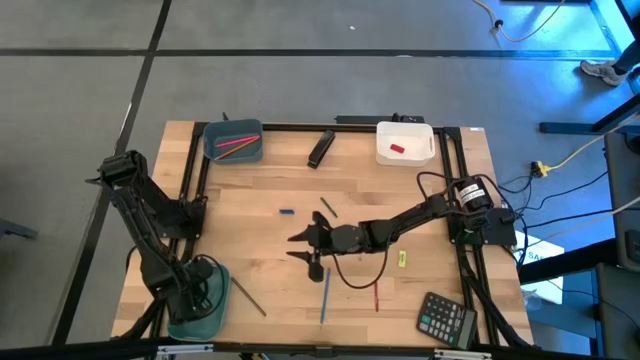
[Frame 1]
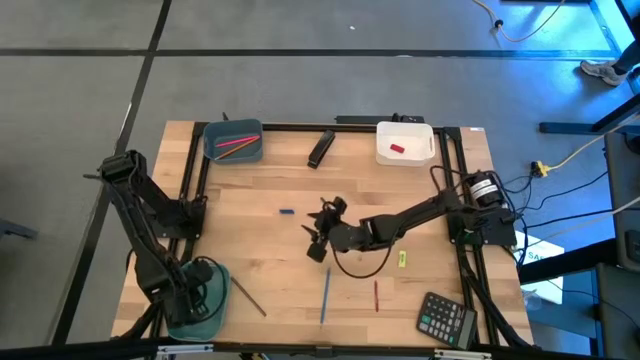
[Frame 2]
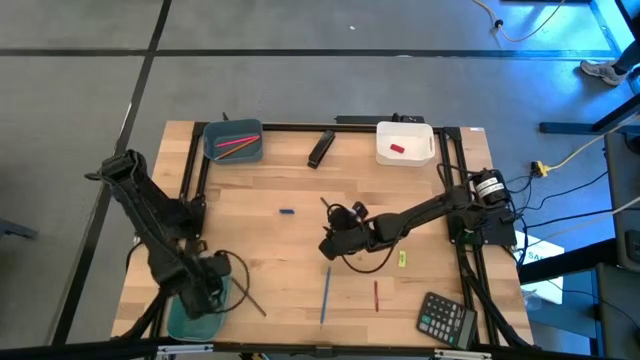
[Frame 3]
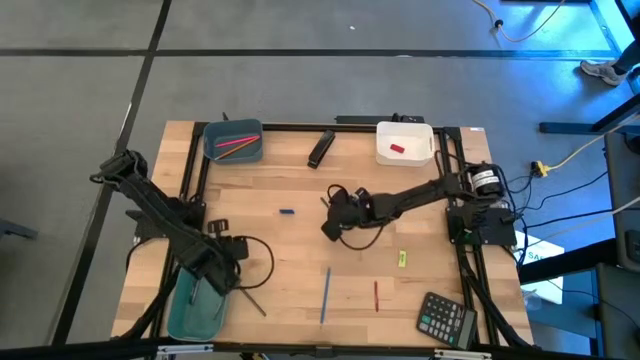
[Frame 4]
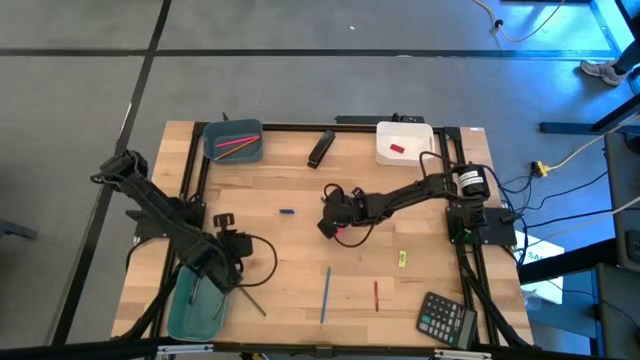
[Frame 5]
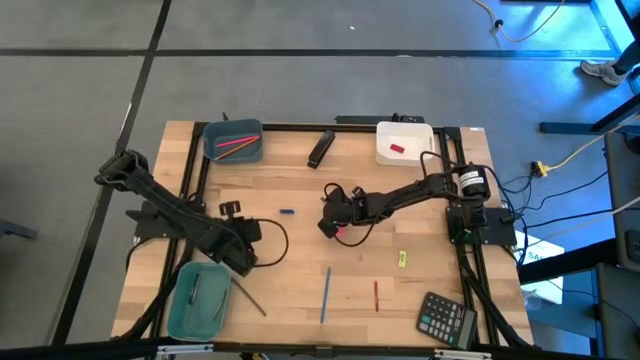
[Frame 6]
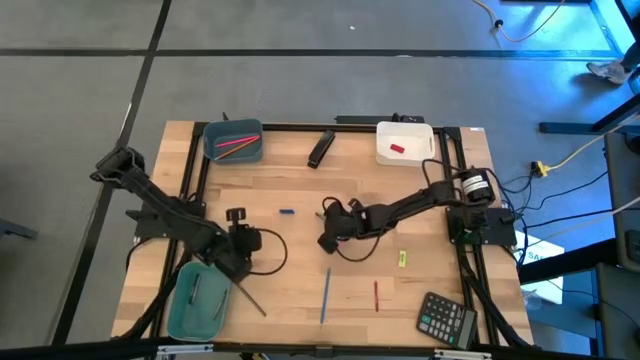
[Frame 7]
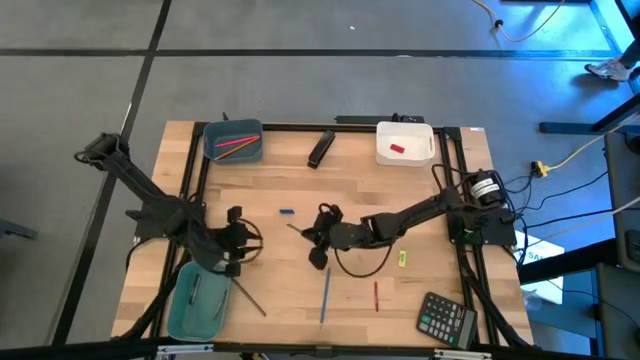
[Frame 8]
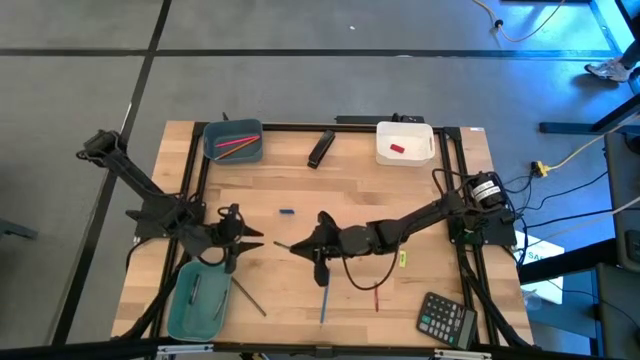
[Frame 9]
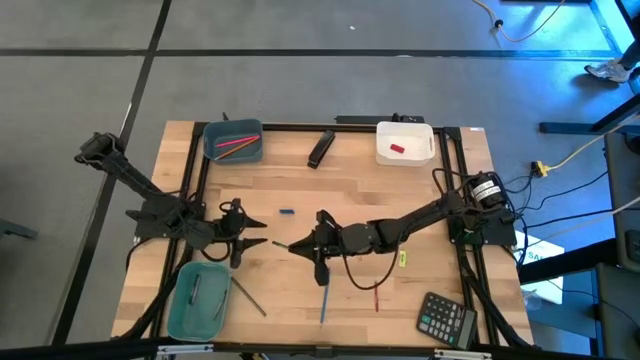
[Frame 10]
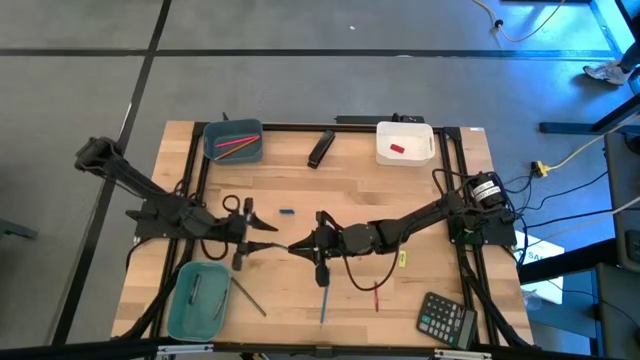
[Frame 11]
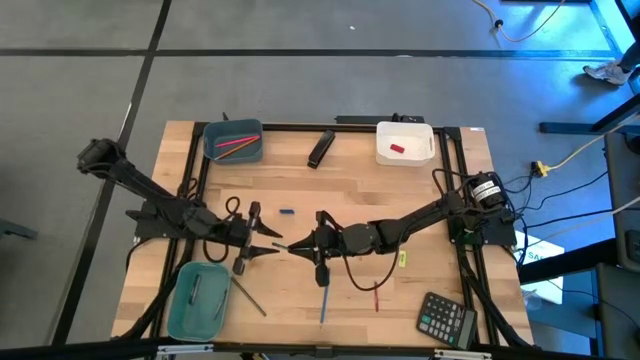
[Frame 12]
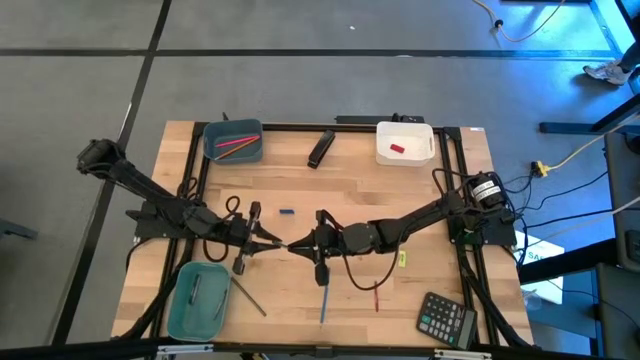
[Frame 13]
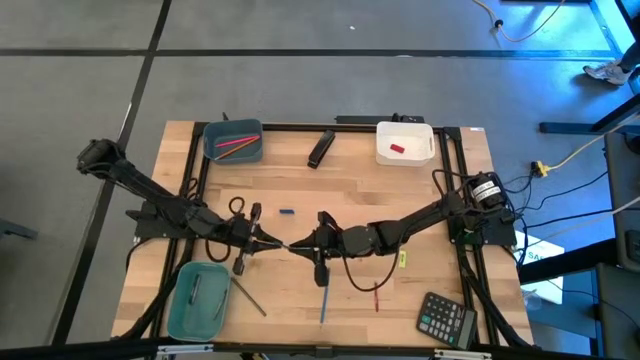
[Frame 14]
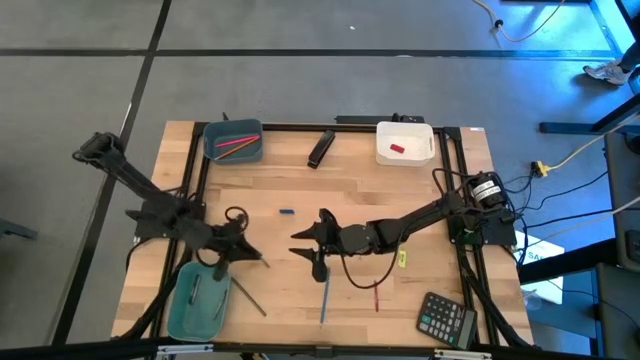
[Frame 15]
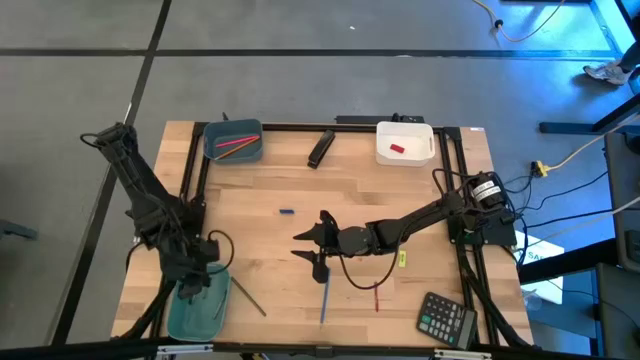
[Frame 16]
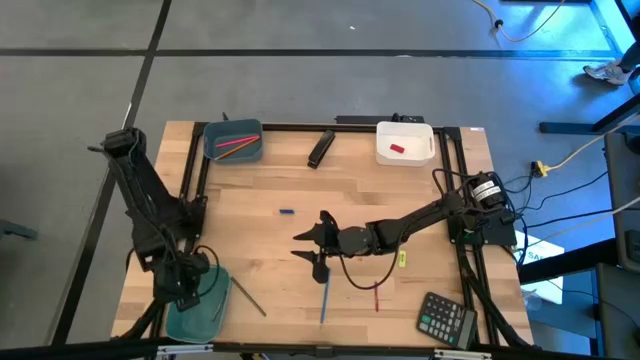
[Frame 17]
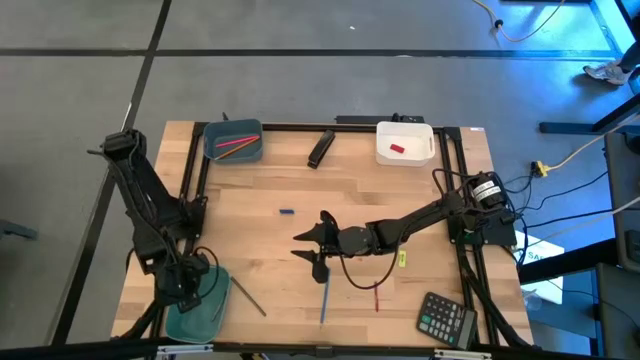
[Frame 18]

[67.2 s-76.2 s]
Task: Sort crayons/erasers/pens/pencils in bins
Put the green crayon into the green bin

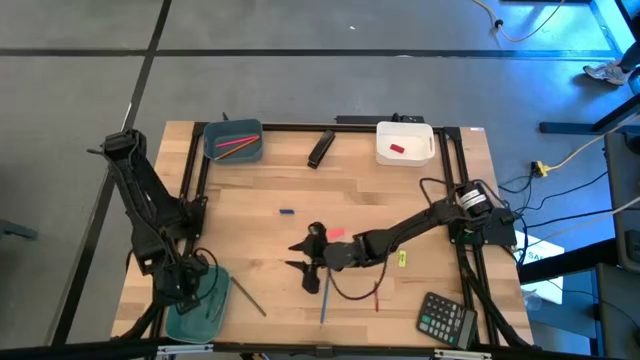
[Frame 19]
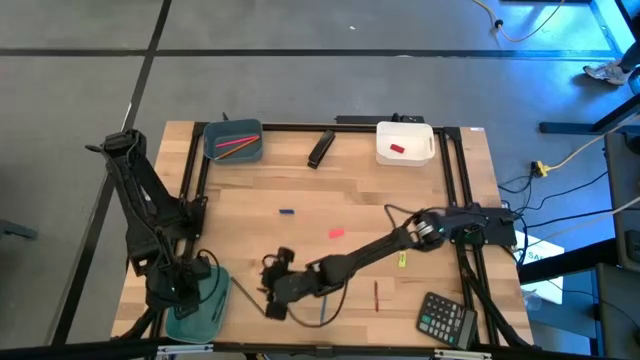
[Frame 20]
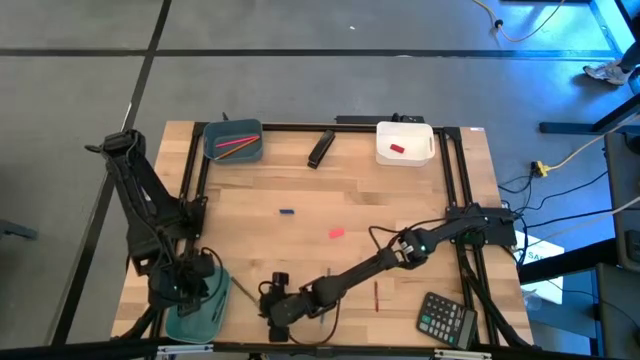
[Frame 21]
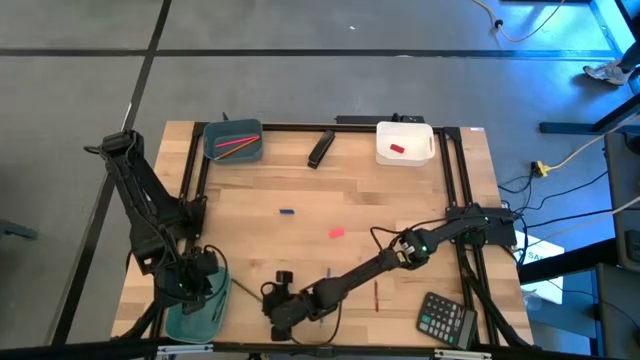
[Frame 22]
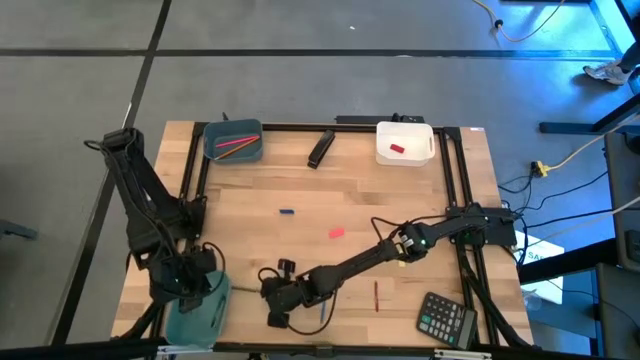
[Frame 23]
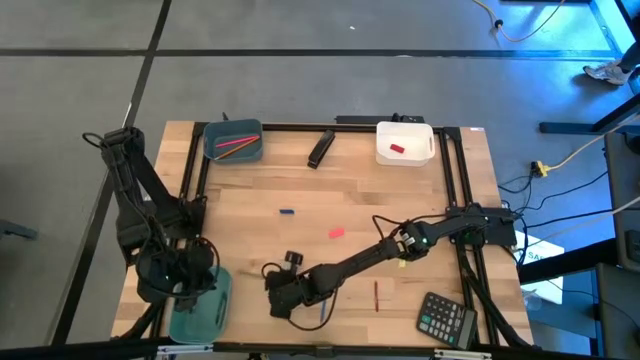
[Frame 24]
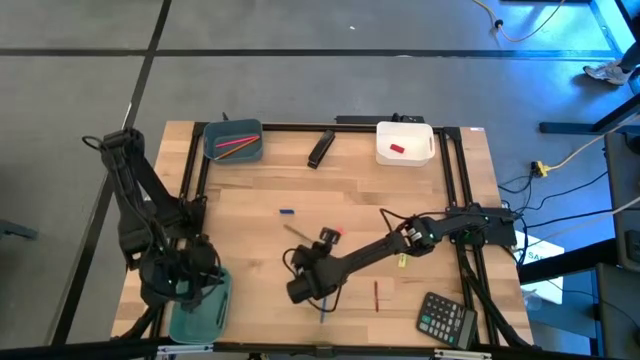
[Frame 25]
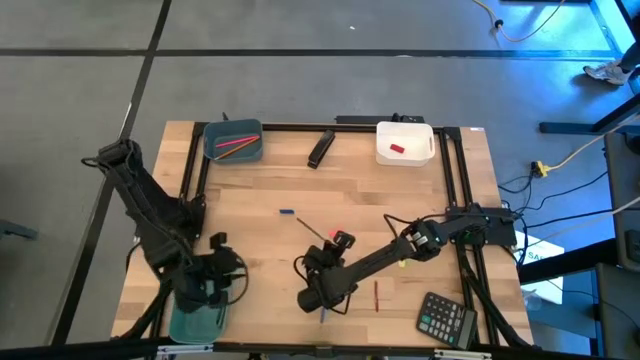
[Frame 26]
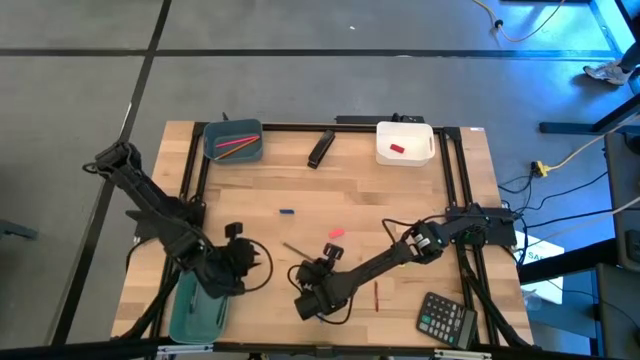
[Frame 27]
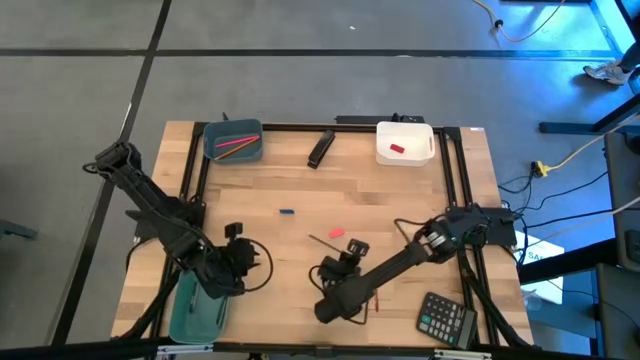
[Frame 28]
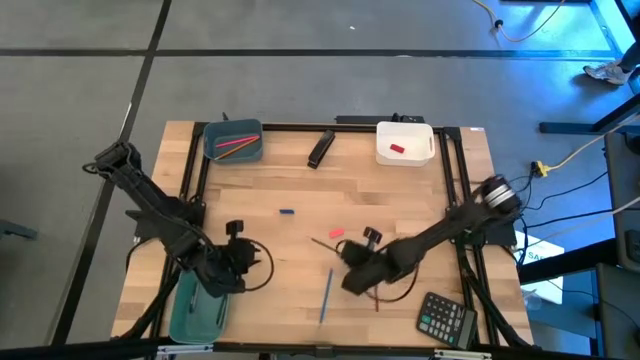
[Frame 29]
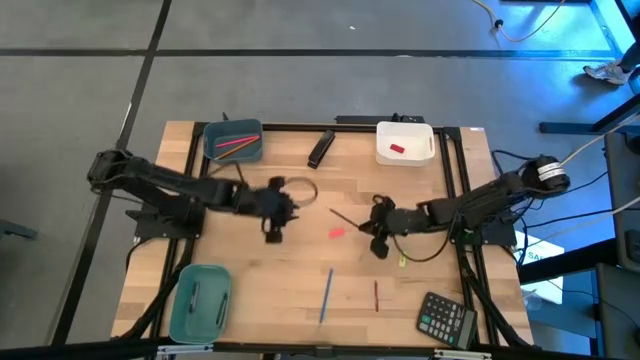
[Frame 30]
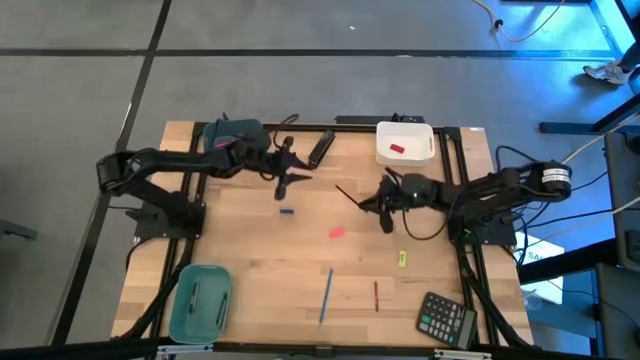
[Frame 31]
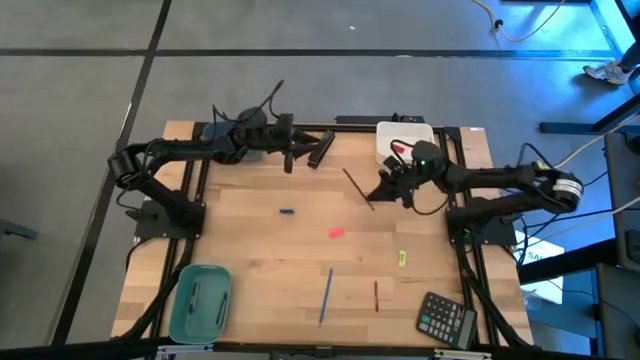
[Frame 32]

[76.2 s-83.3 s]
Put the black pencil into the blue bin

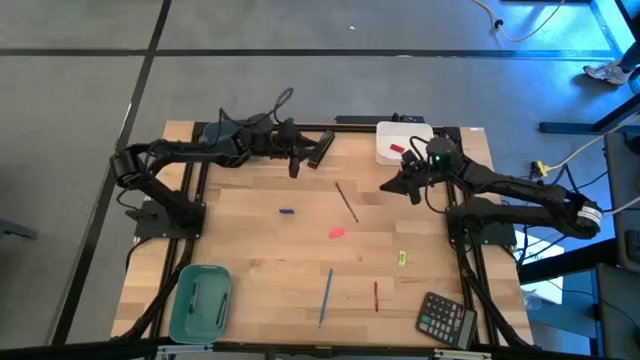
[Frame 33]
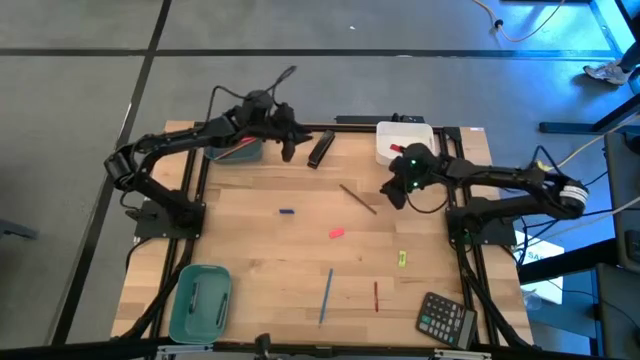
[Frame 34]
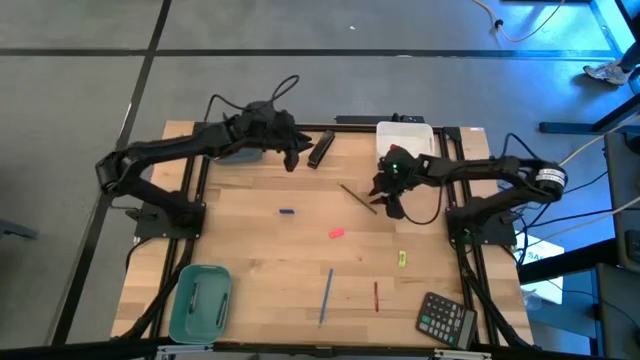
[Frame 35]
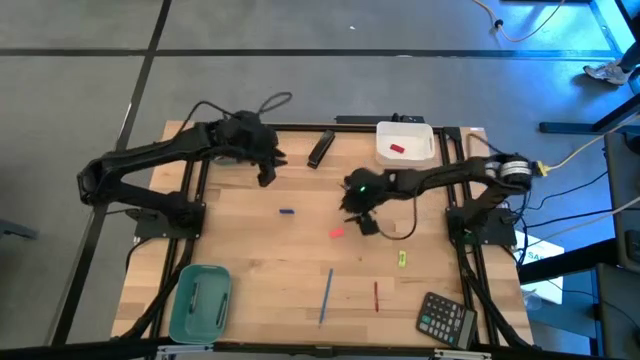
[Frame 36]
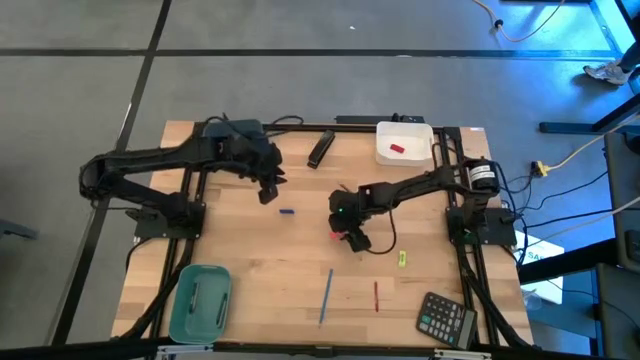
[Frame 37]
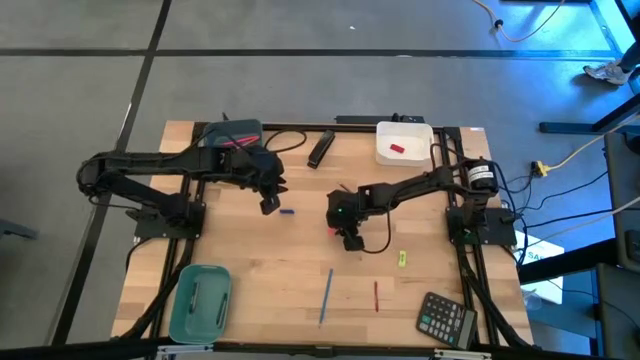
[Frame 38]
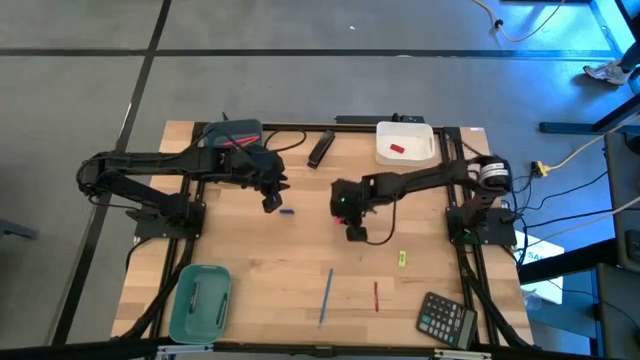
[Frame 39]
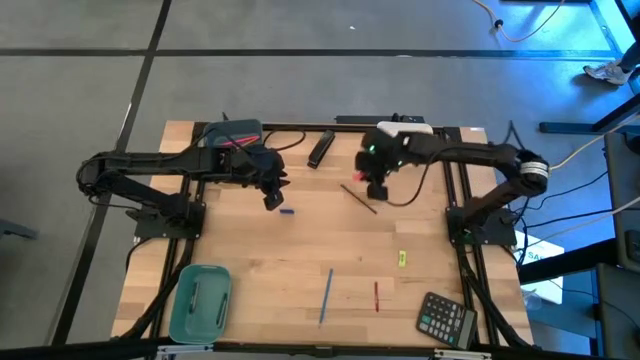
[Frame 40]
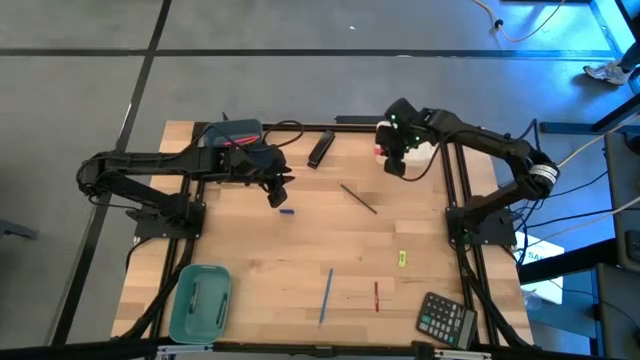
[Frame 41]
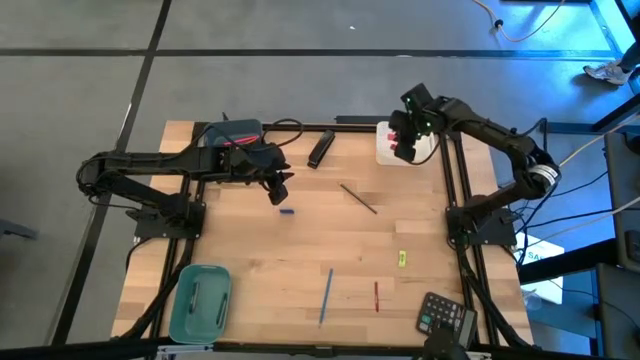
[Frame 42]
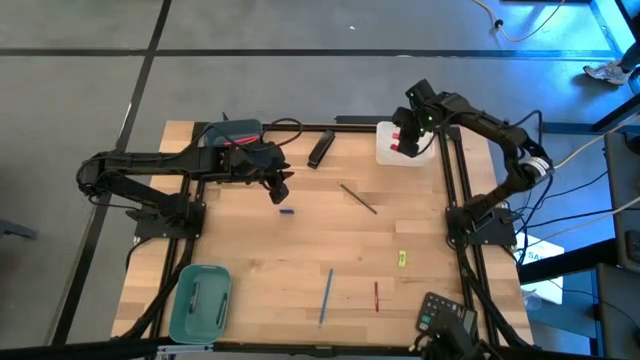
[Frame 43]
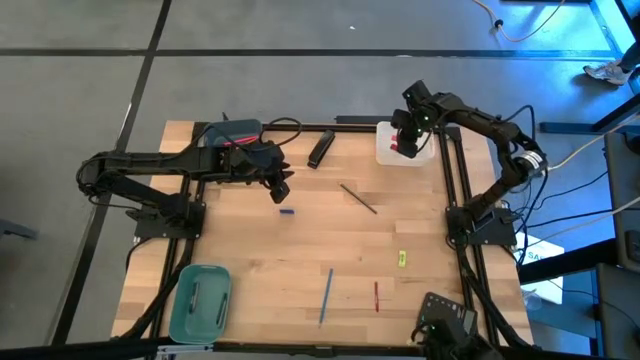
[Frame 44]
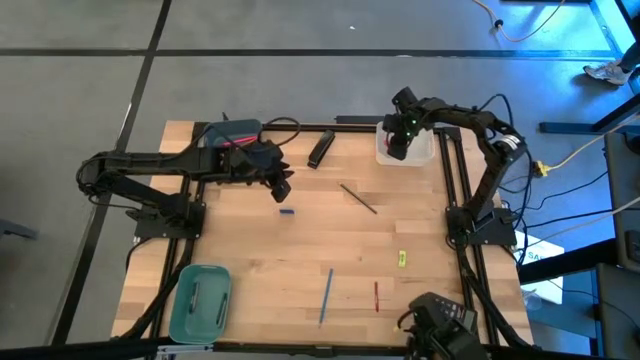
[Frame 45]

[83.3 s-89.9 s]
Put the pink eraser into the white bin
